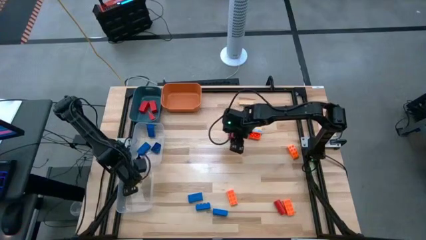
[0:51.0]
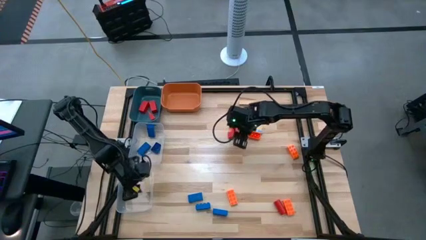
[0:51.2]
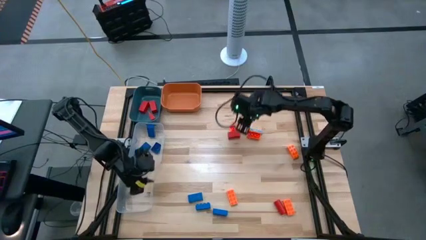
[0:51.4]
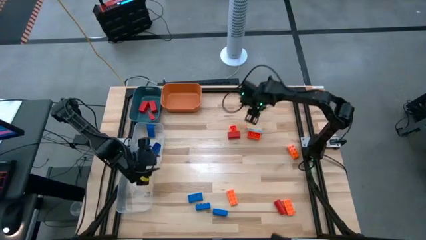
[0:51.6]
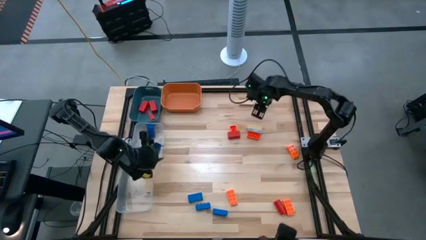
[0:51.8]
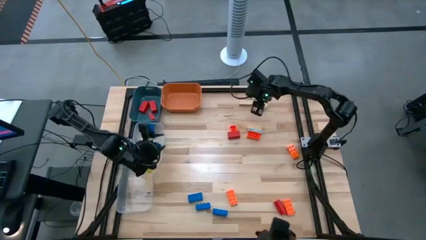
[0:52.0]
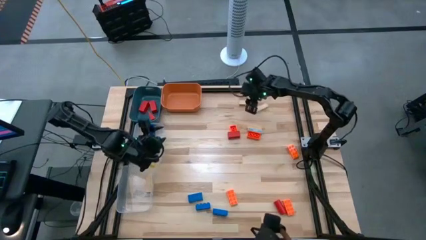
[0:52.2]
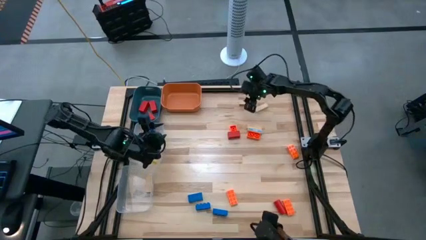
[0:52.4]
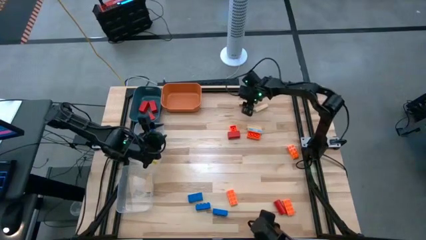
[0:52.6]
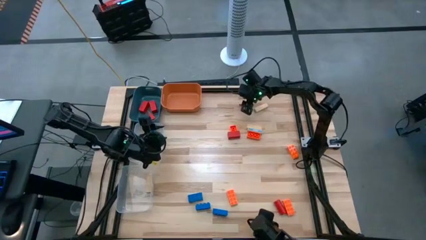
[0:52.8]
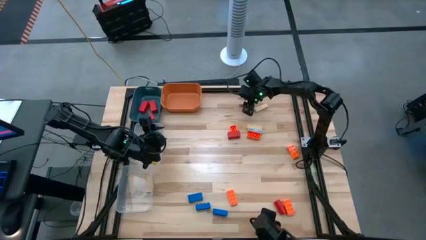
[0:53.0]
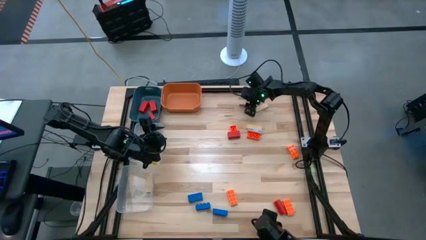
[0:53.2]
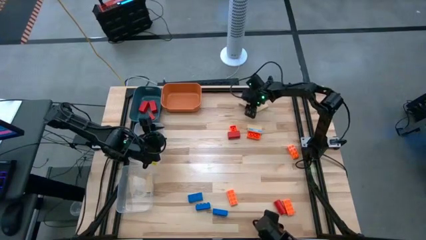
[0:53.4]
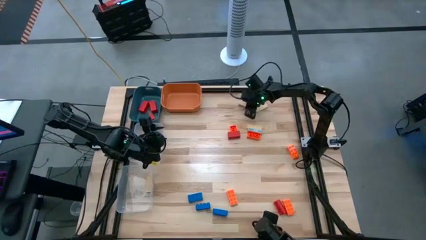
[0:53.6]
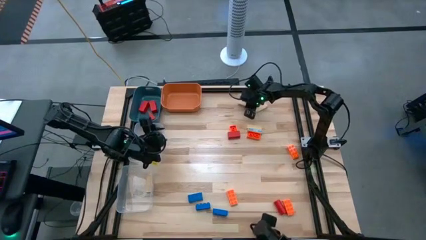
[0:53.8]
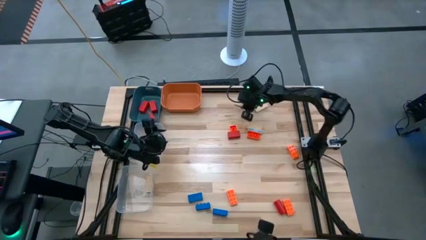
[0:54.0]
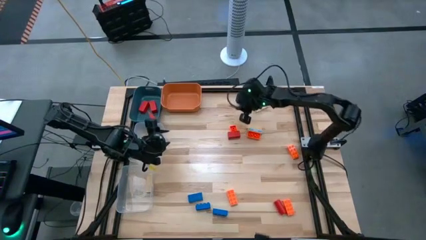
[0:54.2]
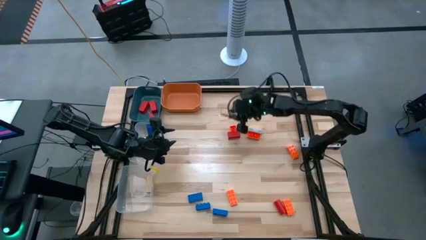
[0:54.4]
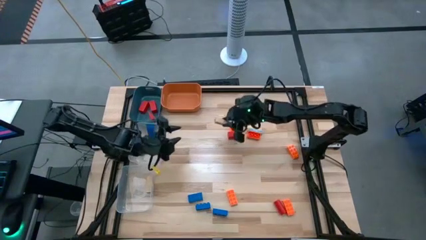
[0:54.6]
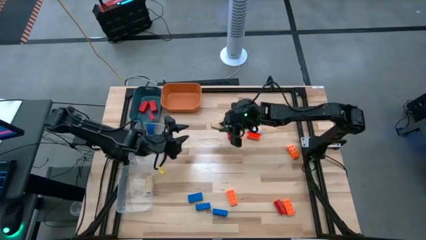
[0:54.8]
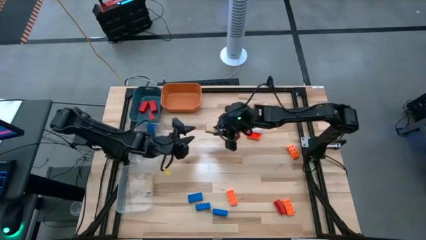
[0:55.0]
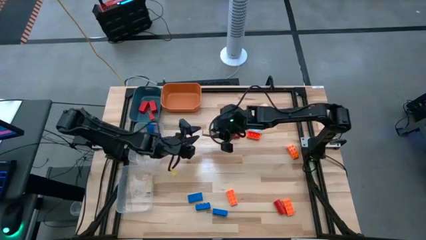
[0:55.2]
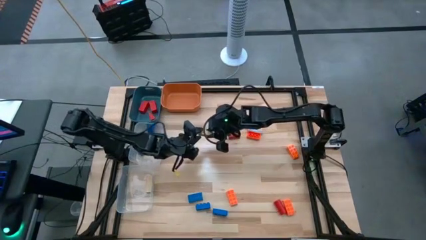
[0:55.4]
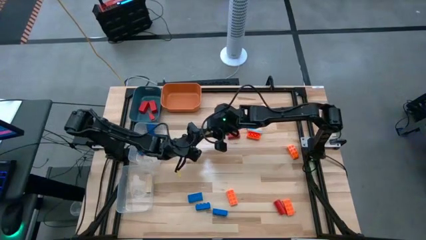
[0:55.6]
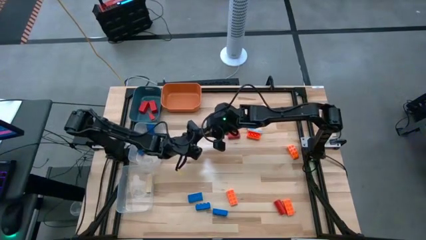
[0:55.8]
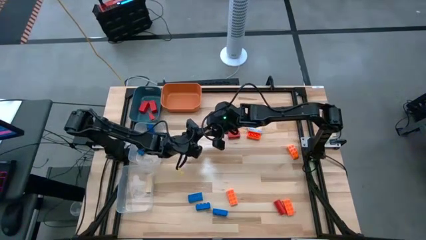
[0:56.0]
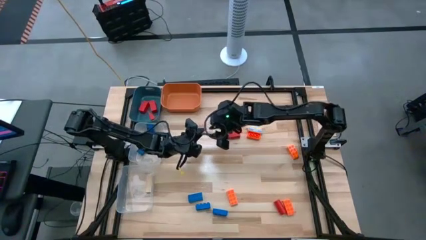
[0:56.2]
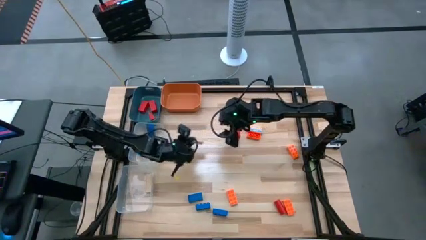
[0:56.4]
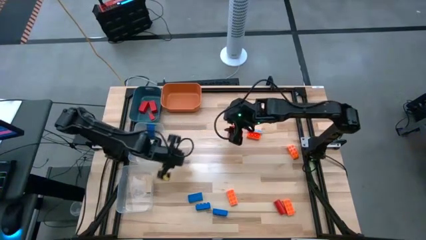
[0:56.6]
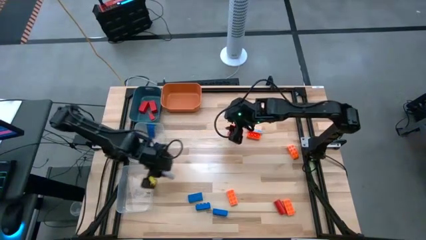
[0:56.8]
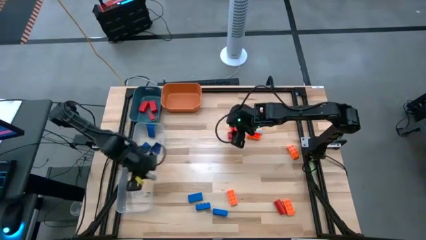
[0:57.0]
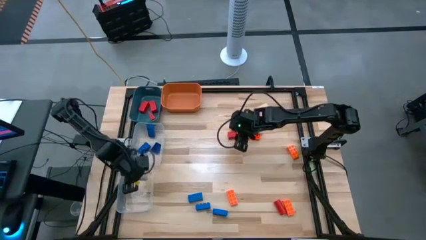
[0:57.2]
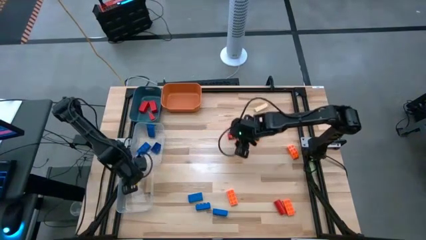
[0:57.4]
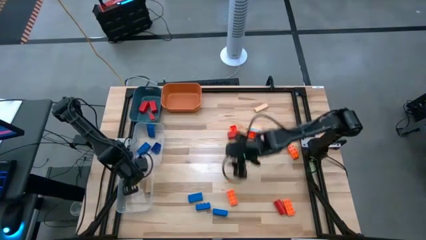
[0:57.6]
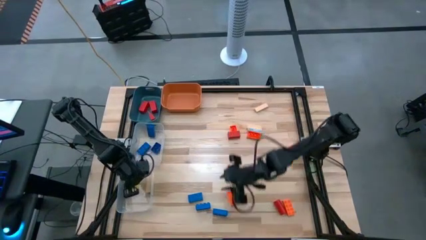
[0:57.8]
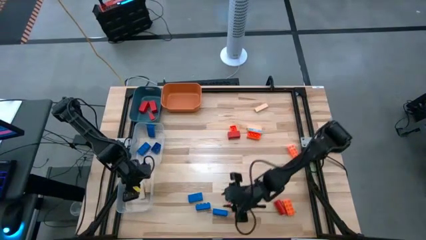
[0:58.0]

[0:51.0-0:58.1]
Task: Sort blocks
Put the wooden brown block into the bottom transparent bin

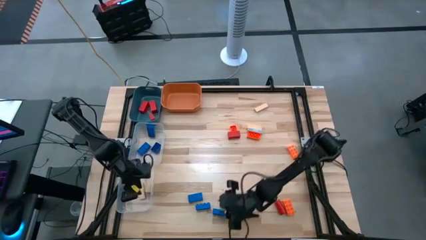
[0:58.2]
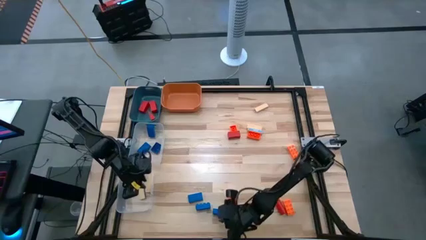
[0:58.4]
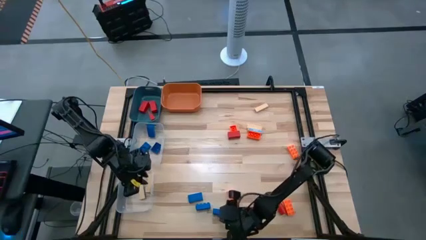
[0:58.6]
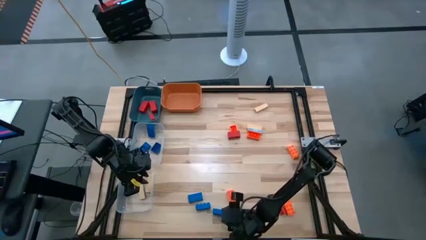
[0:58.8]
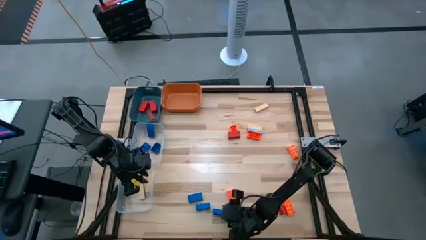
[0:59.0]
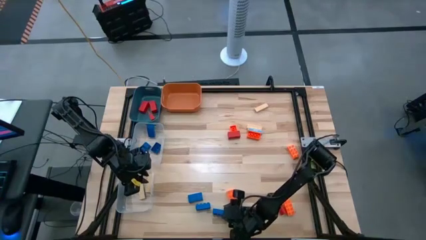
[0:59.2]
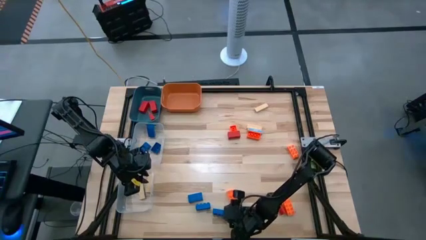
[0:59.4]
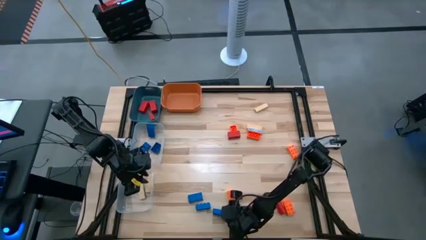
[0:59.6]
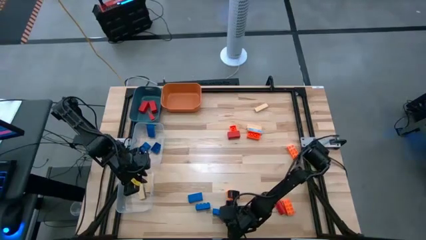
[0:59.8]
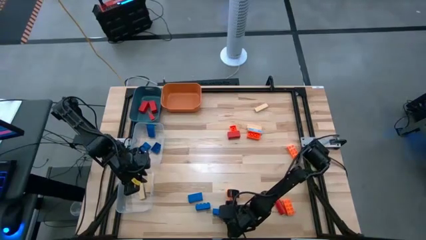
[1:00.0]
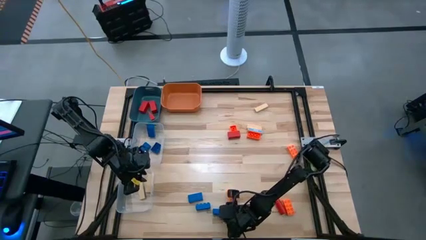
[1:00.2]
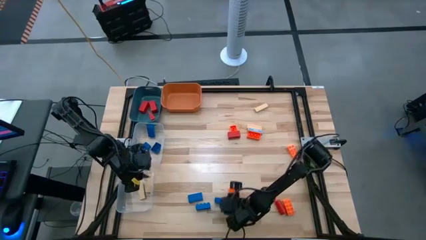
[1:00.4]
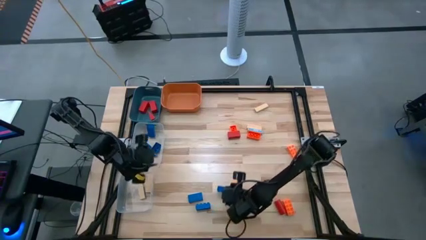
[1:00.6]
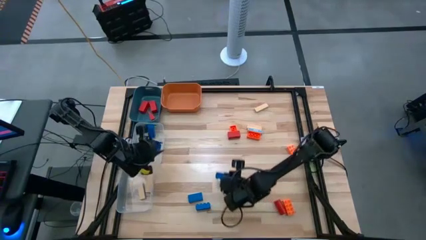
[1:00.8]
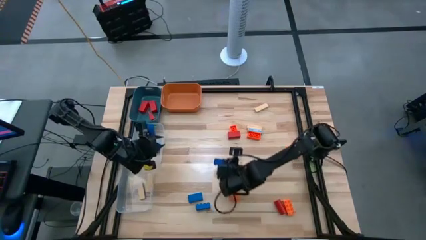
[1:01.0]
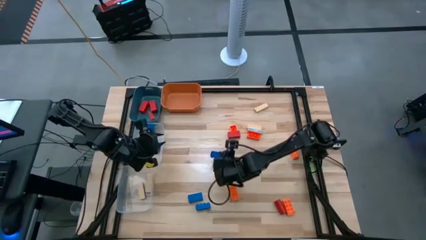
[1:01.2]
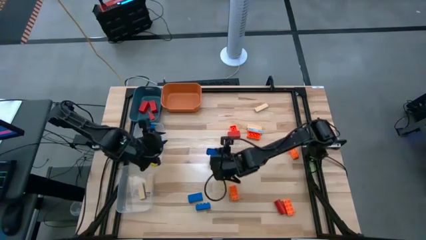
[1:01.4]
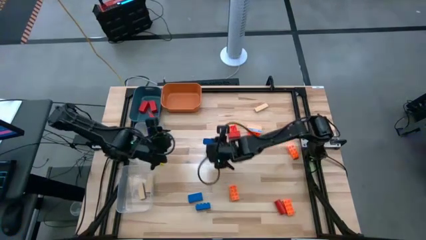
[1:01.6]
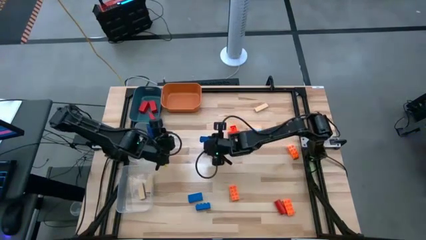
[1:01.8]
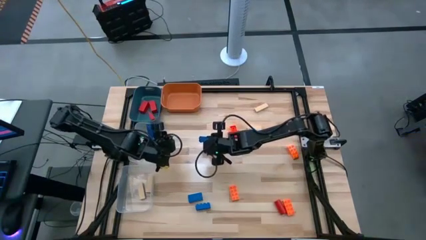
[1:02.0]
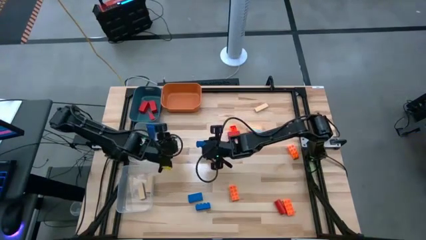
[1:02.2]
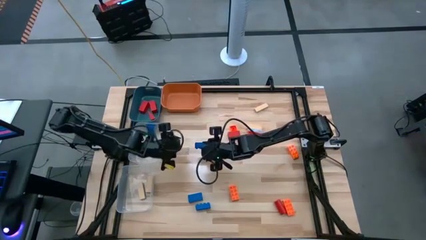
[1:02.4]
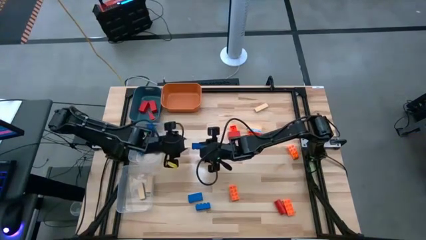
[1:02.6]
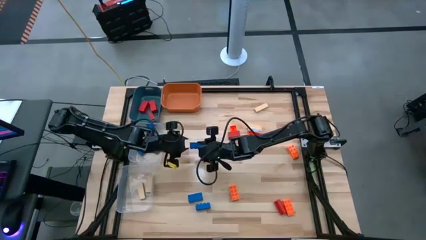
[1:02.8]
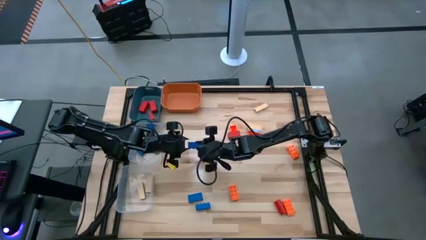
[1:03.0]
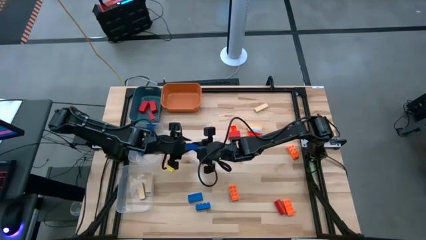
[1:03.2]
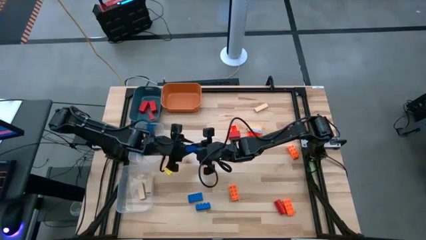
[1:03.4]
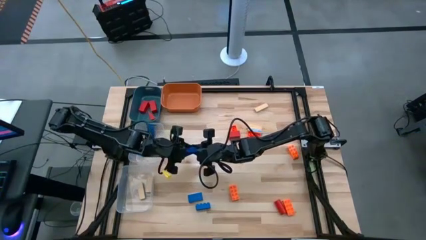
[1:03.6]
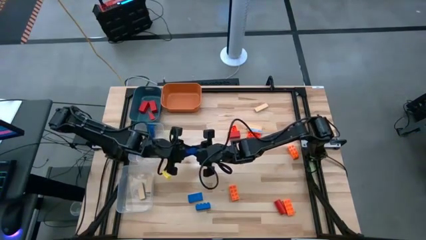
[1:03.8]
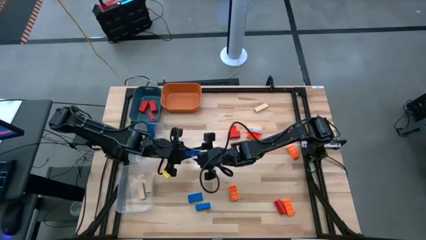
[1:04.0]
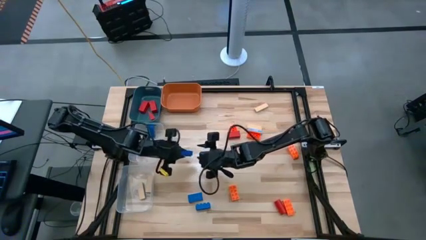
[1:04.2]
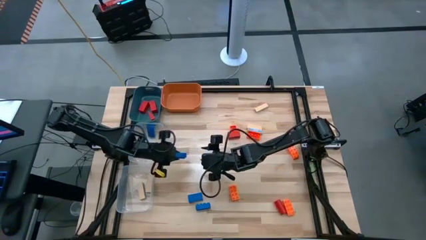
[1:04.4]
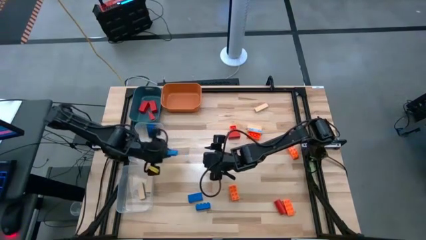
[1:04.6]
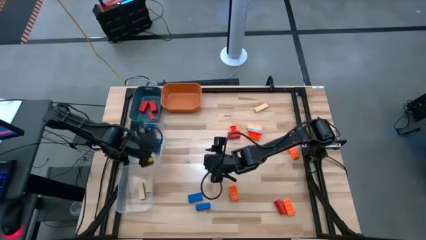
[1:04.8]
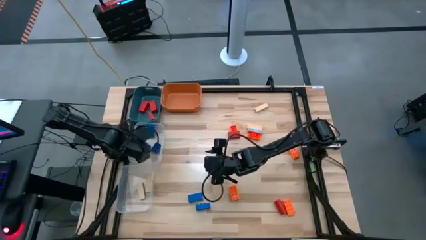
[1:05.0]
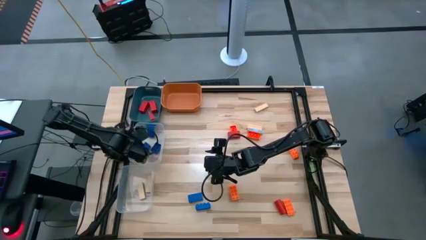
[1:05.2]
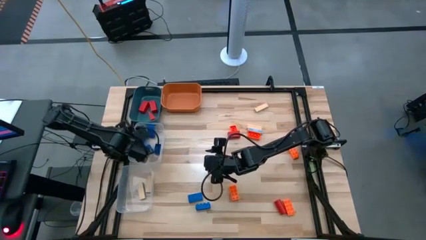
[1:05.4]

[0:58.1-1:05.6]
Put the blue game piece into the top transparent bin

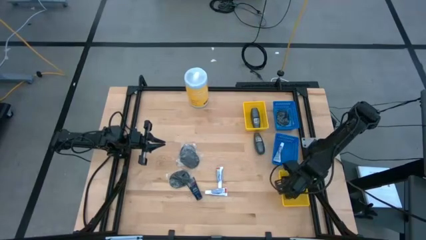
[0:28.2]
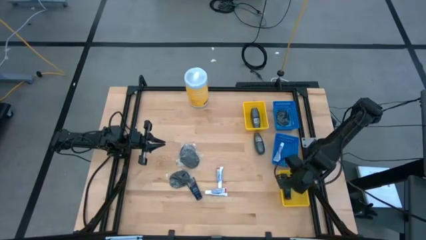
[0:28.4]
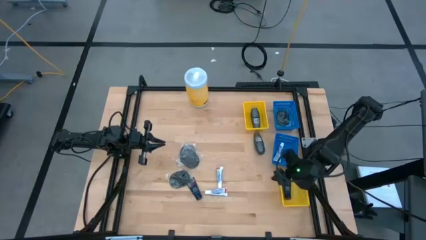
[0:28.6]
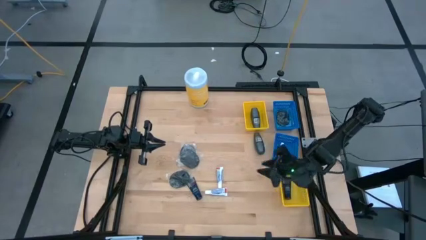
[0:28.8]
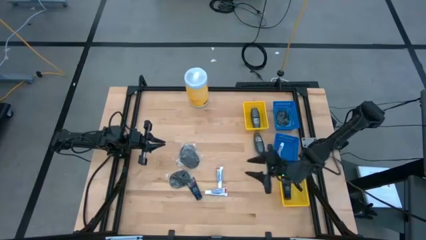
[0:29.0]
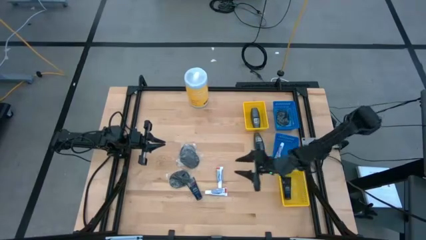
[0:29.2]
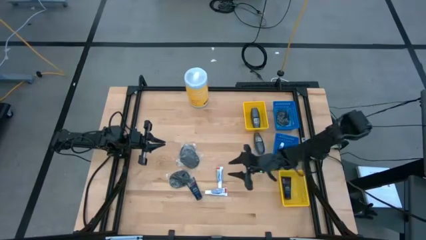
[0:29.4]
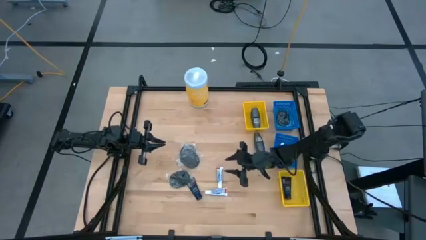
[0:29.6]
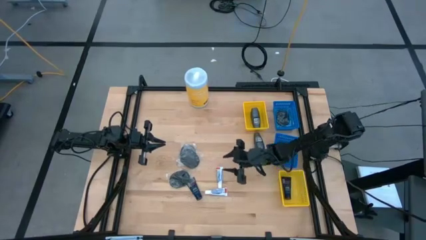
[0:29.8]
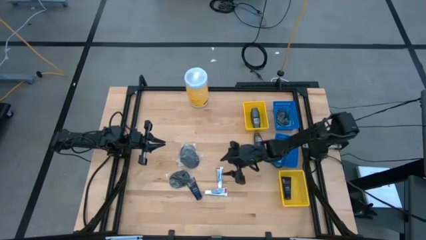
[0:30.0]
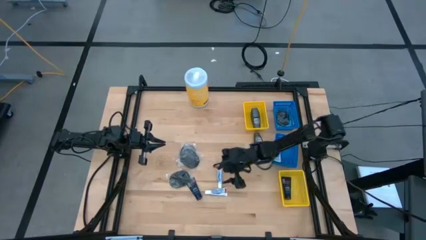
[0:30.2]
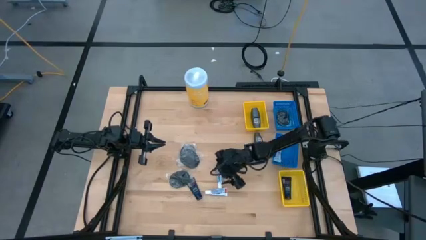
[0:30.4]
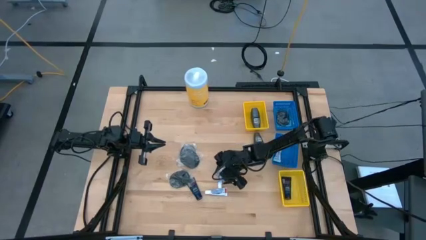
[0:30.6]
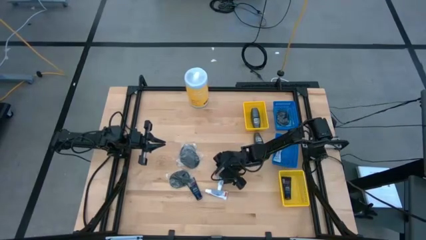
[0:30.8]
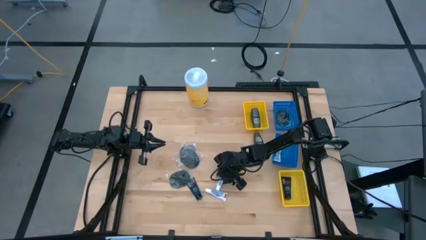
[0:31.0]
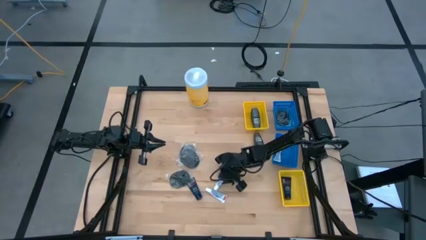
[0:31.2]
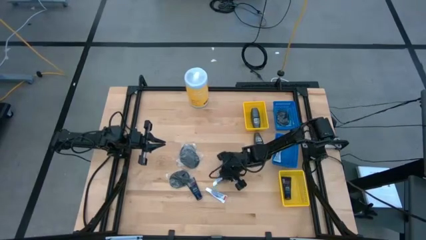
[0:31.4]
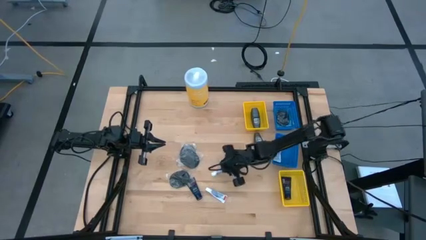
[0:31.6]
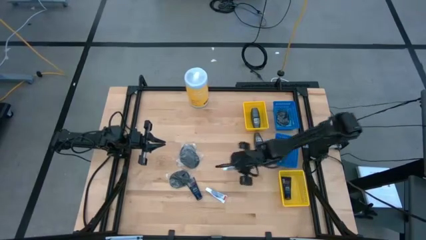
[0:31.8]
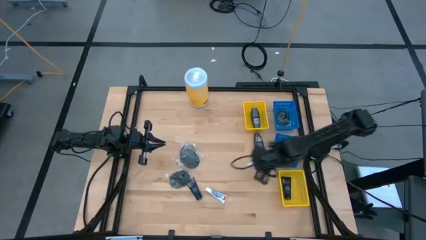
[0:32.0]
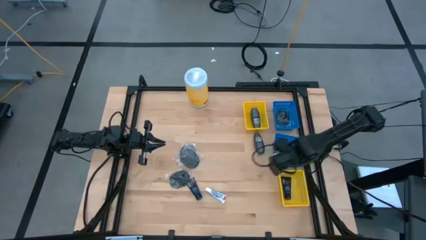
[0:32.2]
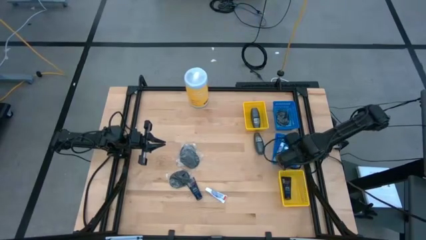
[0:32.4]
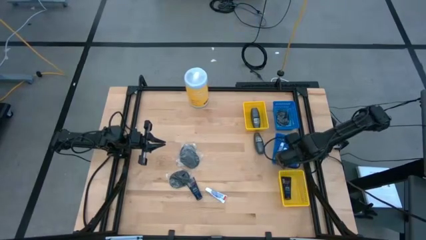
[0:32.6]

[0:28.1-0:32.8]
Task: Pick & Place Travel size toiletries
Put the top white toothpaste into the bottom blue basket
